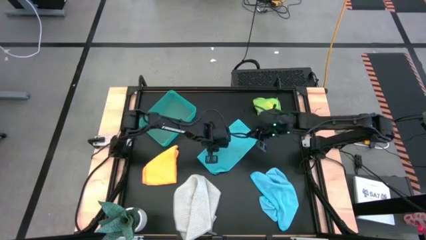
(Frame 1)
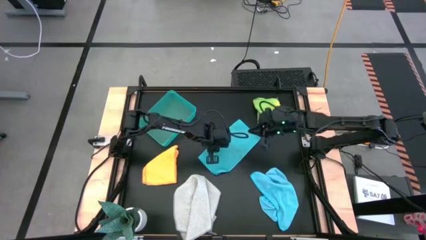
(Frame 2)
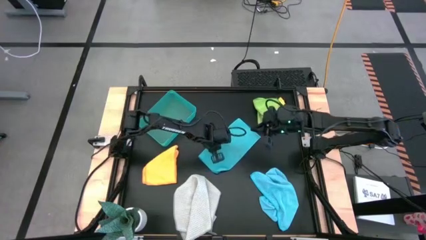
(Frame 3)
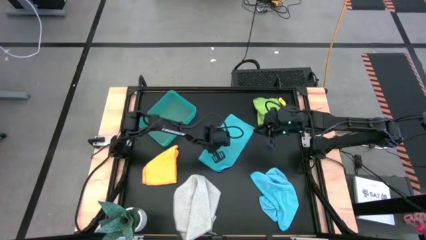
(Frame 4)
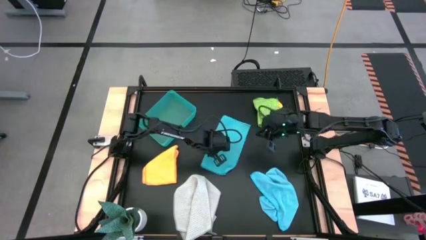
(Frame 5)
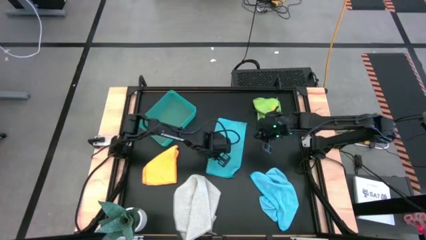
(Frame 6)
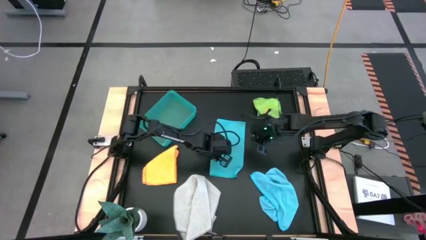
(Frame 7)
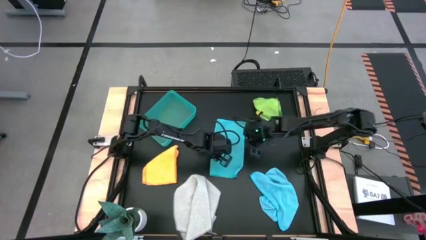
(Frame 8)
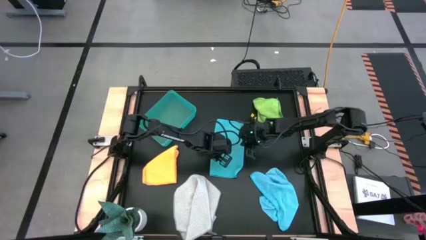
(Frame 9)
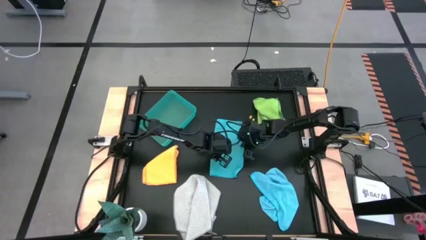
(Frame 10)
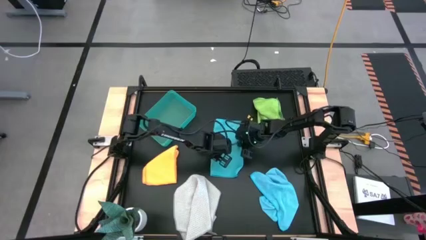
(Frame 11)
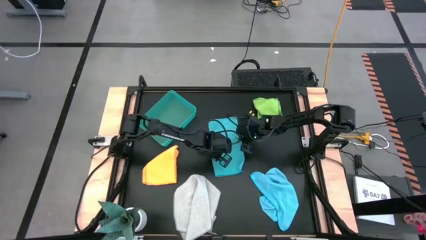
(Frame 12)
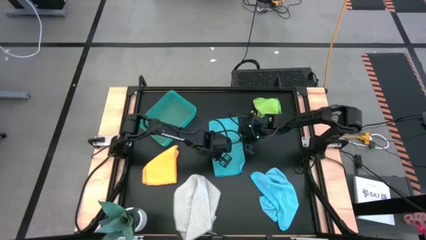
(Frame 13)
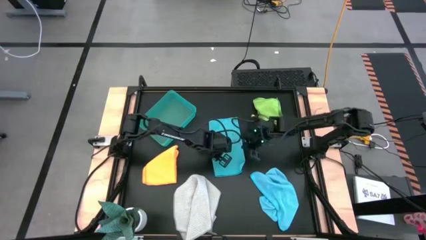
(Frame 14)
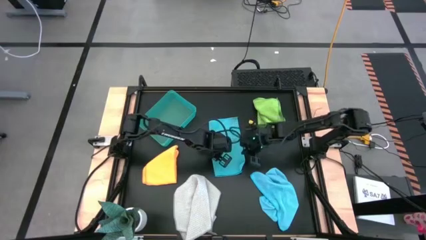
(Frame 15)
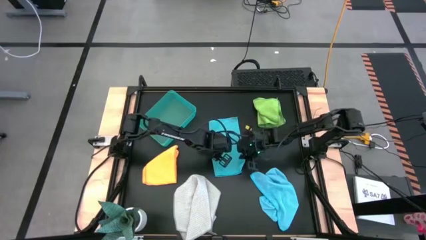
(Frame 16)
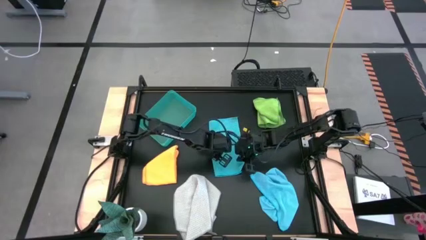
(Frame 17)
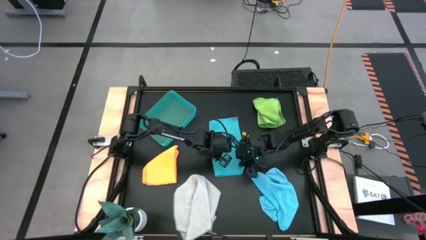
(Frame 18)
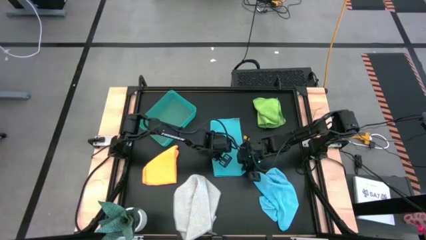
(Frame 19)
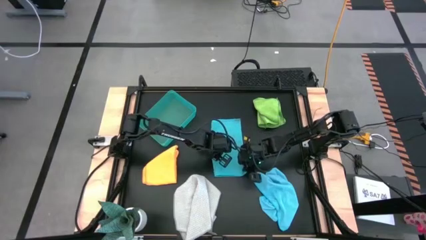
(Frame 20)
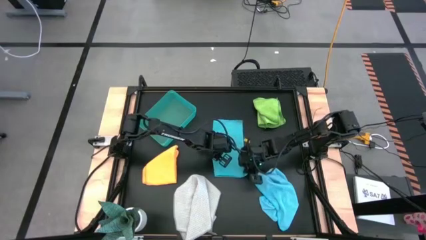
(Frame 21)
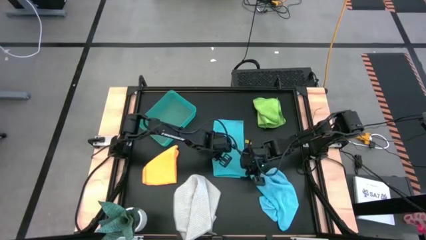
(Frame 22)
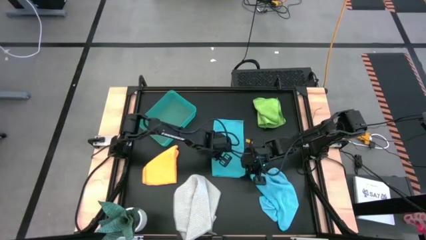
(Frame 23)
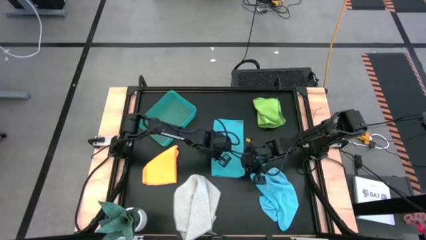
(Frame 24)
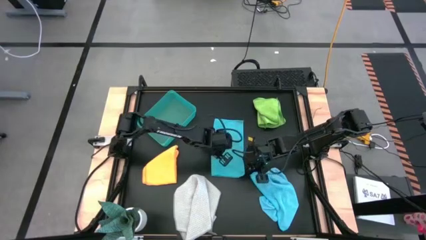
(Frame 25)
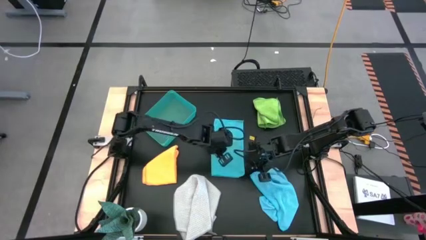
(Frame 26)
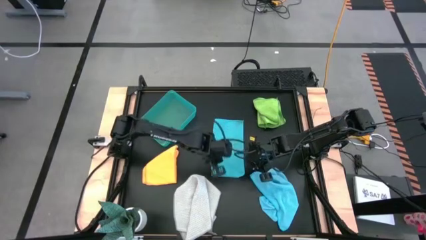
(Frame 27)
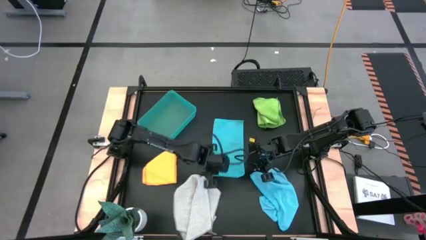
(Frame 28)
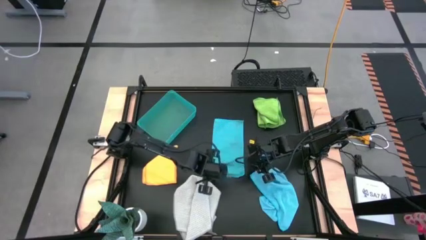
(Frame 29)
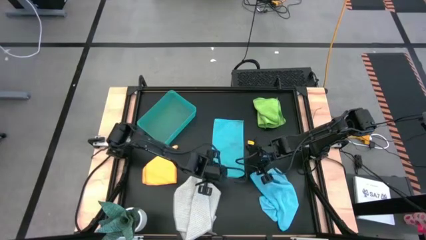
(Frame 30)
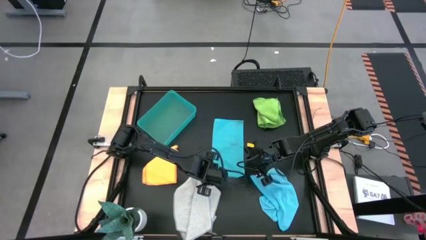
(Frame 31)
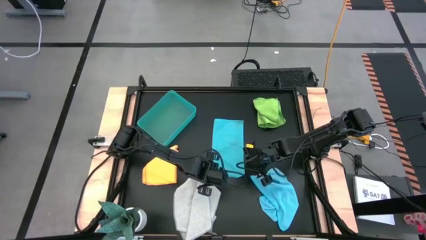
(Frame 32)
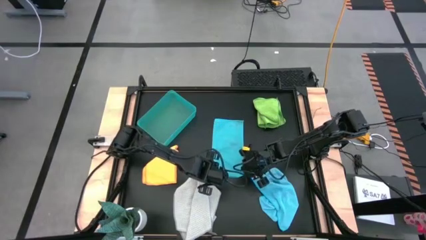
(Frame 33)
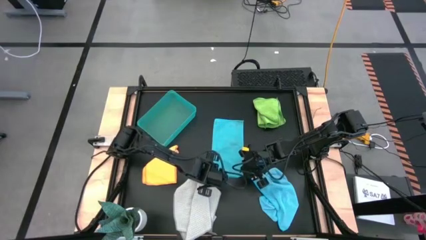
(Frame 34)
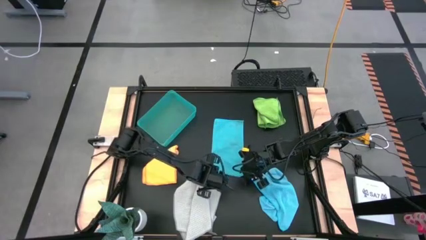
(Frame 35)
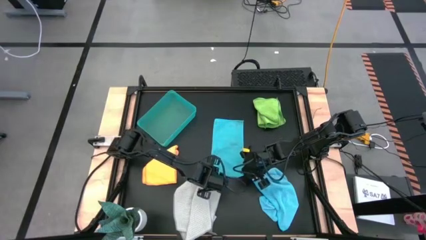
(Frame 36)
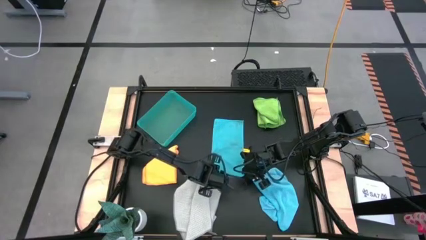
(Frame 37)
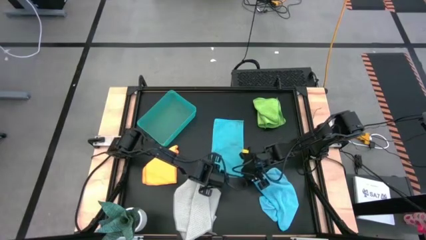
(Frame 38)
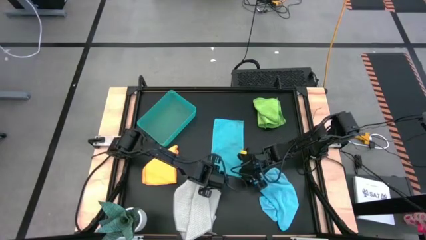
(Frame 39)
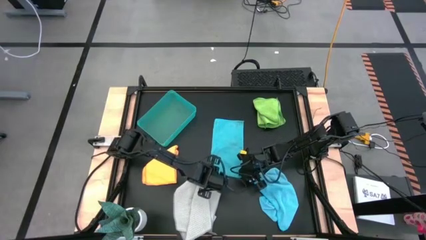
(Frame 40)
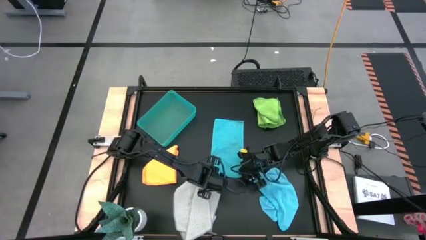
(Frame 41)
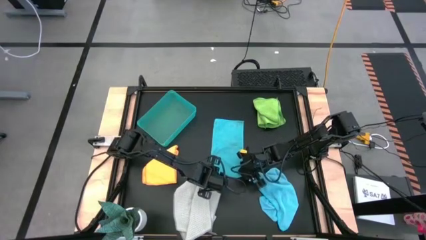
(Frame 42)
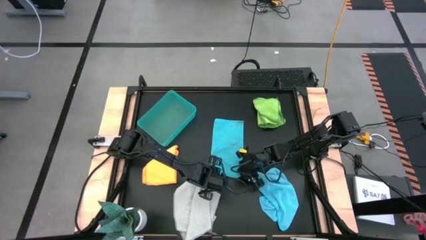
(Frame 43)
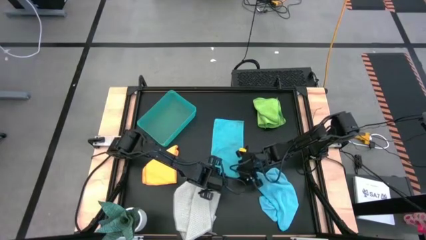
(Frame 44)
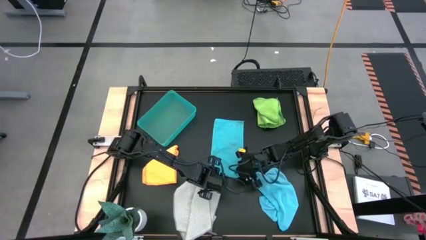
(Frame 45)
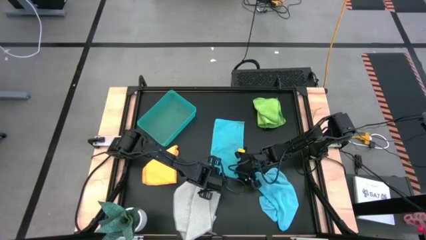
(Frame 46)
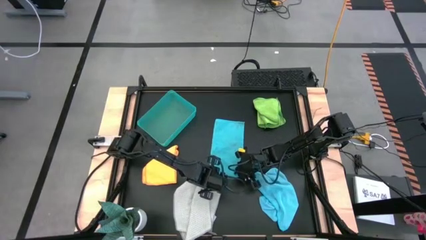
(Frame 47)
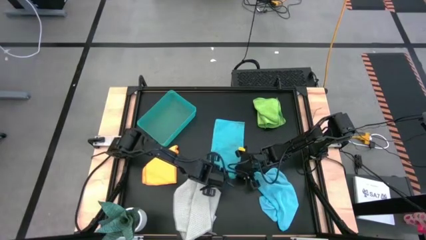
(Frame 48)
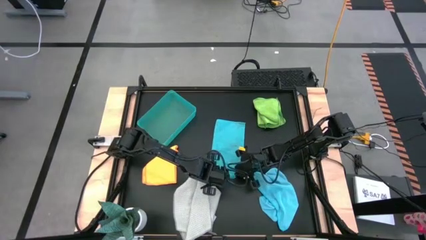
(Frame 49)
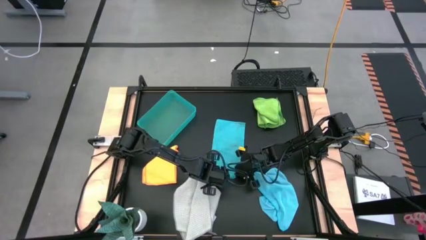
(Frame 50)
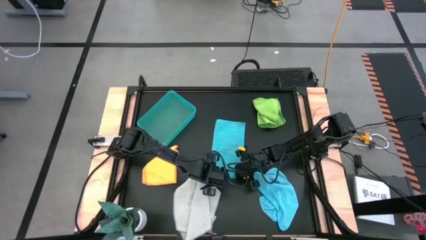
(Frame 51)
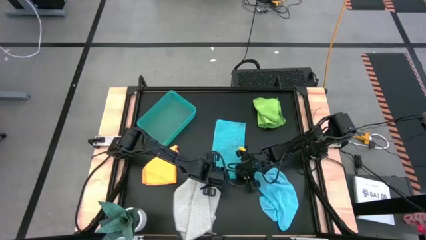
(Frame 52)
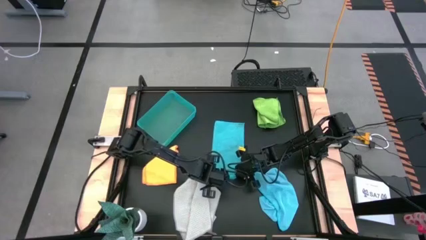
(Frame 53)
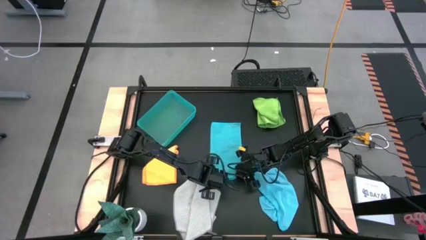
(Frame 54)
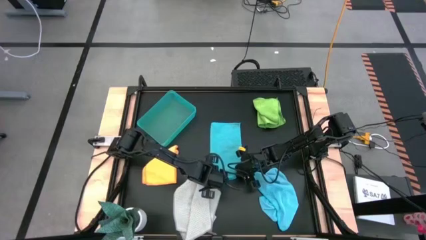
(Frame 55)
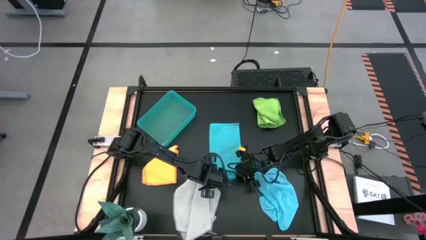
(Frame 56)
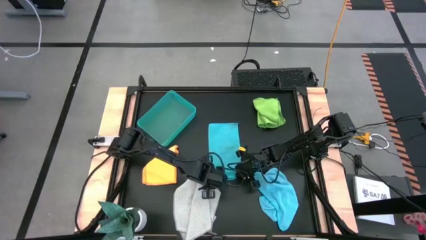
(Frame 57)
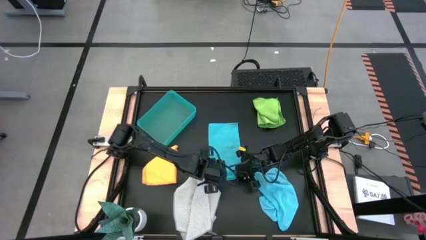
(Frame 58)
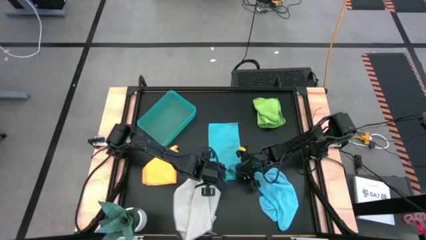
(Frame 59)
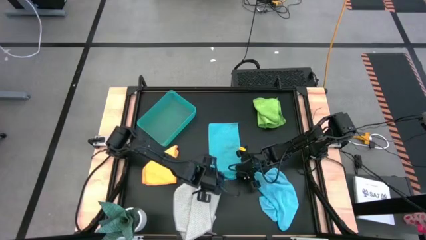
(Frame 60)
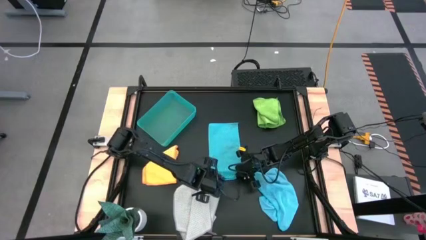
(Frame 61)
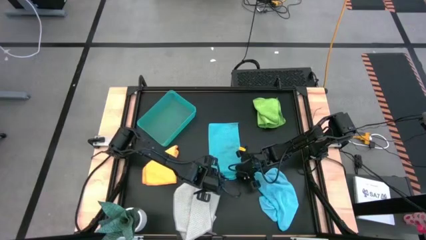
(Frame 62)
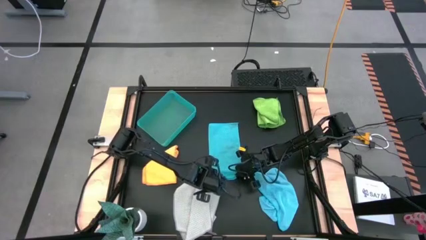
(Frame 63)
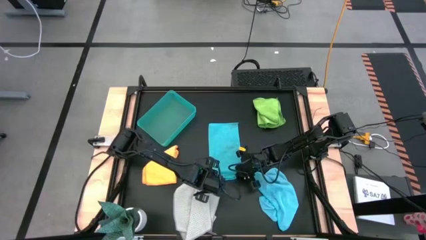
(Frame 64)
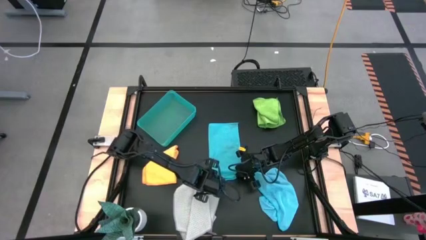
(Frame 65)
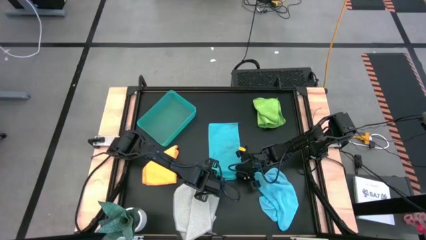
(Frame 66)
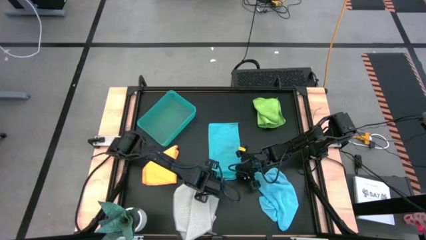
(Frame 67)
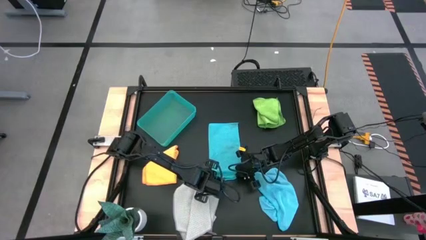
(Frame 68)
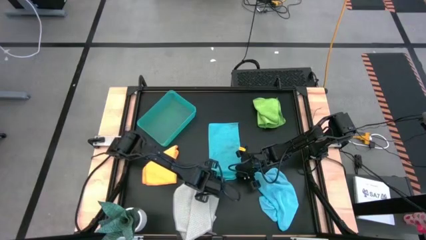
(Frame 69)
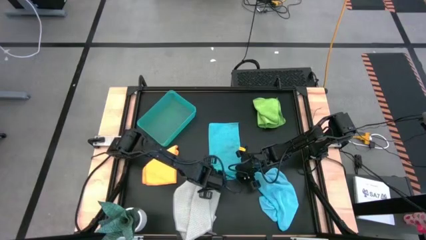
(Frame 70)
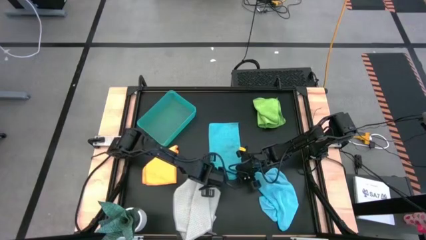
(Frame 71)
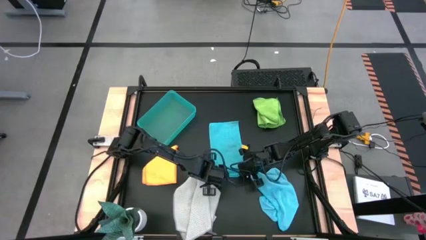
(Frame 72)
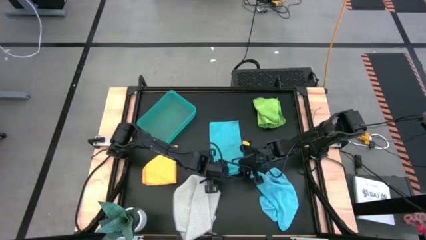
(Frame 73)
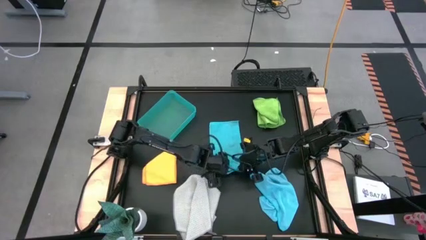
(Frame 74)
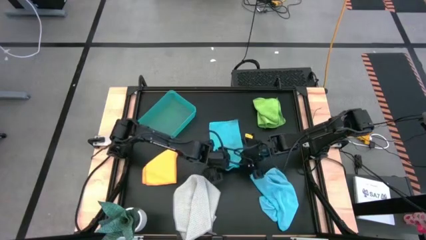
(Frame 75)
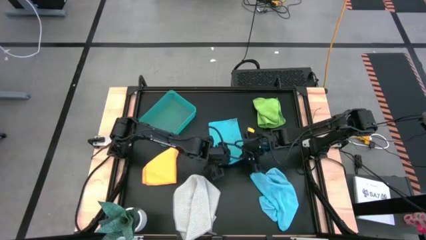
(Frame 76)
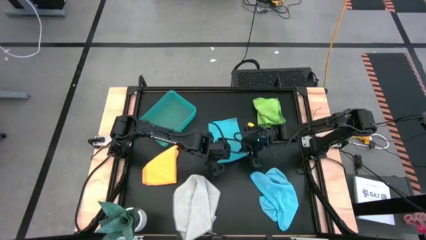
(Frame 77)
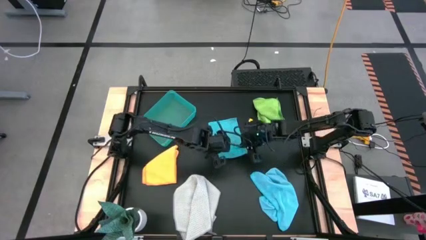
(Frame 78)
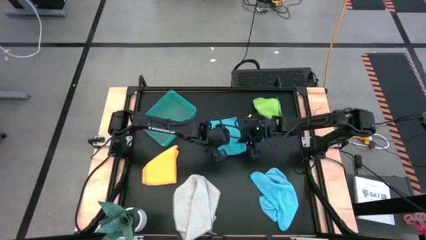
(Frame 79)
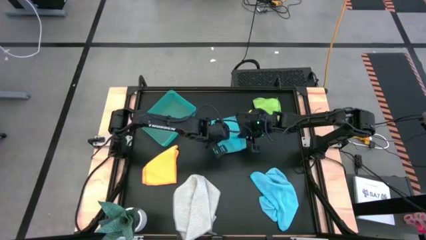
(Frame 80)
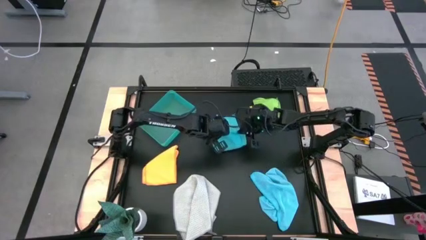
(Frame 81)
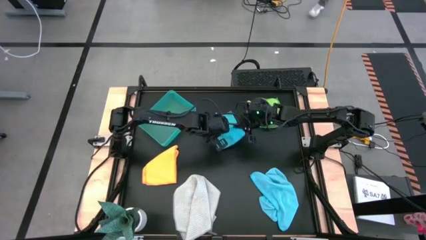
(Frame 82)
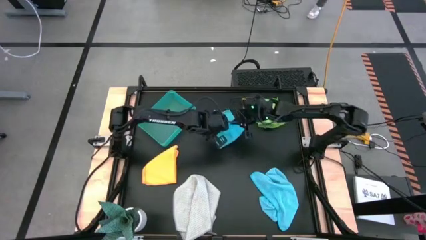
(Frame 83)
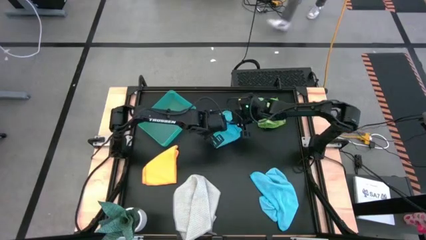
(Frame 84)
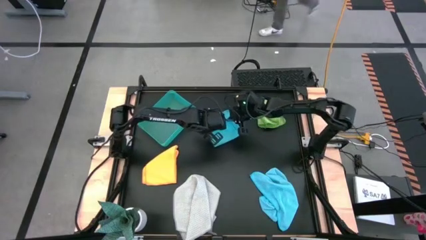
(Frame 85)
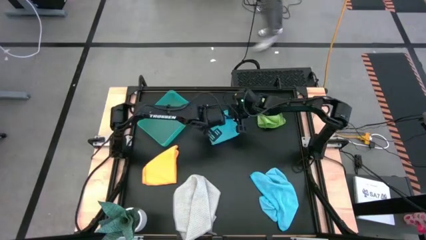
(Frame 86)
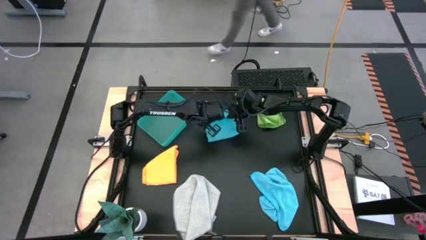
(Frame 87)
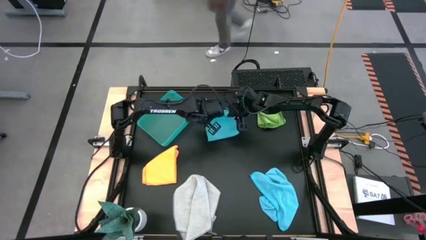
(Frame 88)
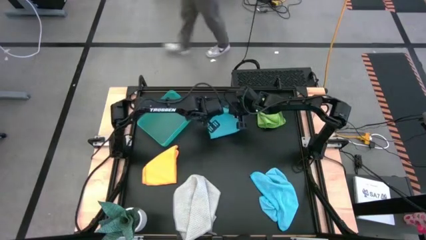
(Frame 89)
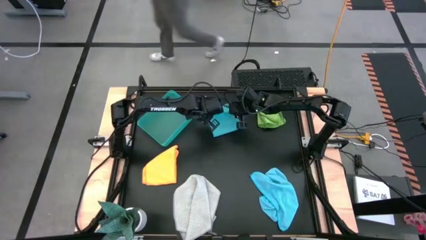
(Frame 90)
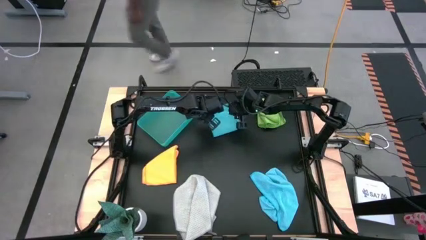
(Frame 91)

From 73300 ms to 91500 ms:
Task: Fold microfiber towels
Fold the top blue microfiber towel
